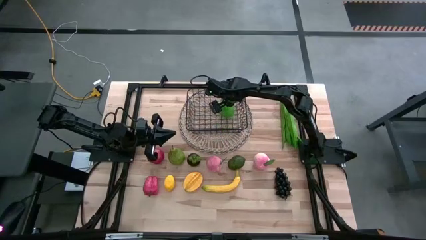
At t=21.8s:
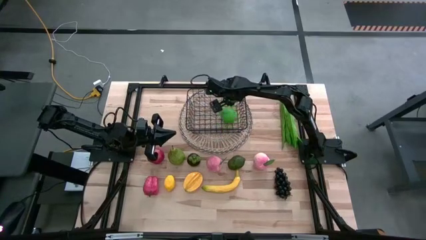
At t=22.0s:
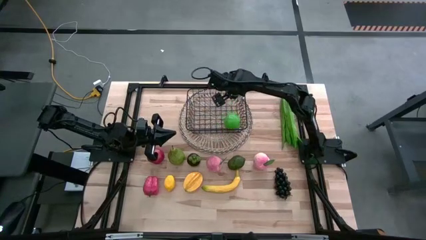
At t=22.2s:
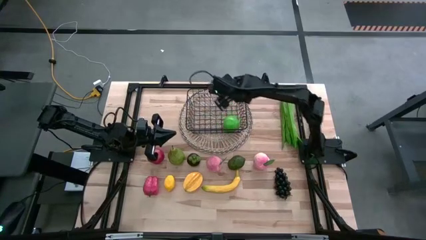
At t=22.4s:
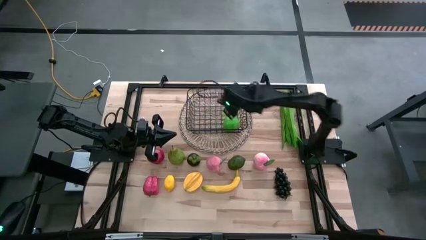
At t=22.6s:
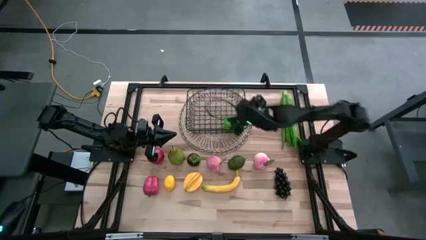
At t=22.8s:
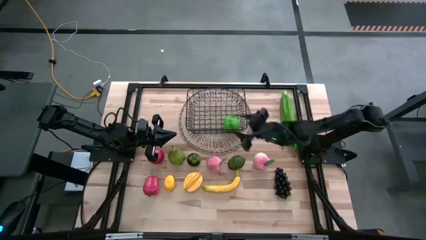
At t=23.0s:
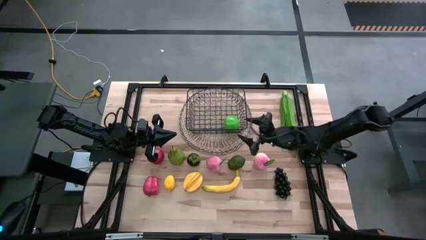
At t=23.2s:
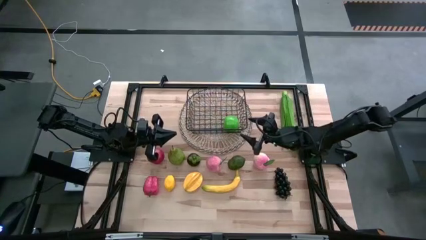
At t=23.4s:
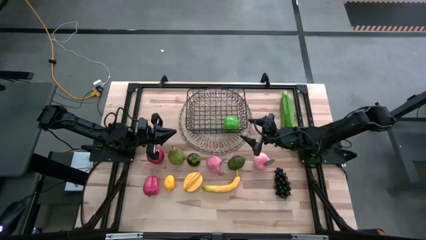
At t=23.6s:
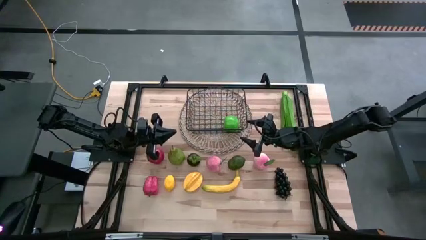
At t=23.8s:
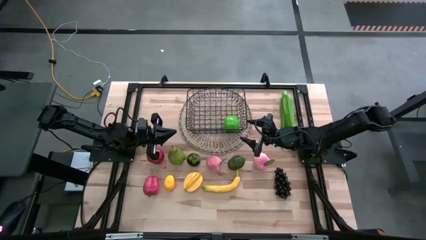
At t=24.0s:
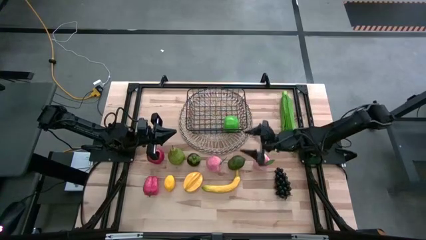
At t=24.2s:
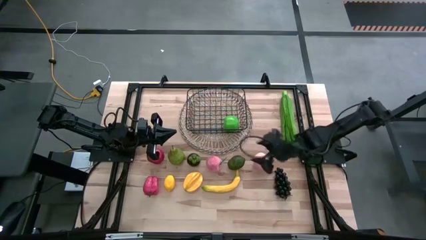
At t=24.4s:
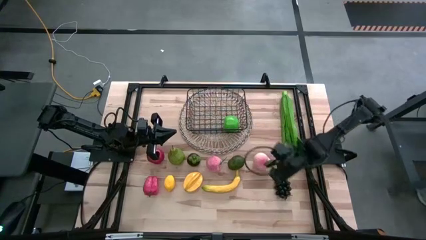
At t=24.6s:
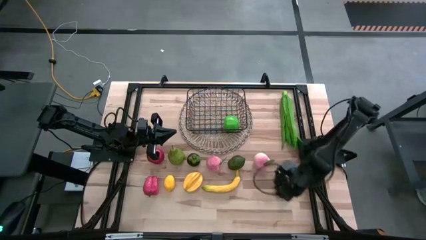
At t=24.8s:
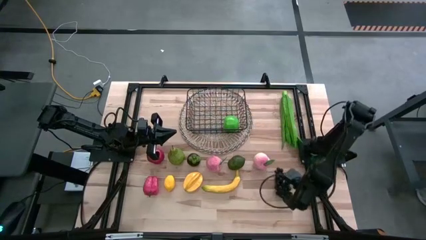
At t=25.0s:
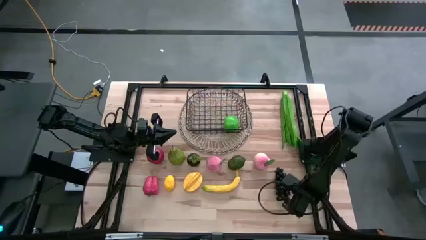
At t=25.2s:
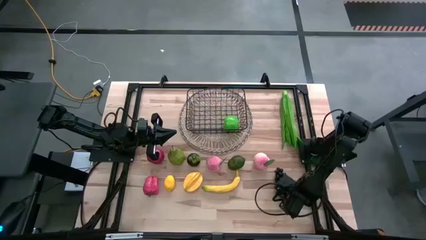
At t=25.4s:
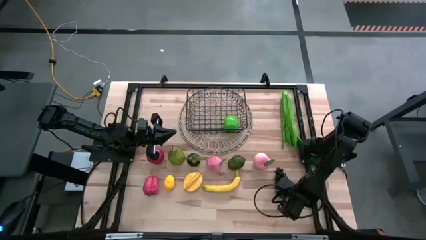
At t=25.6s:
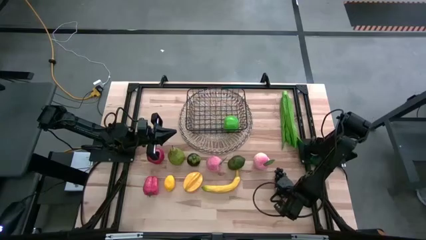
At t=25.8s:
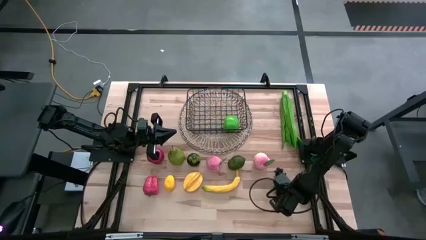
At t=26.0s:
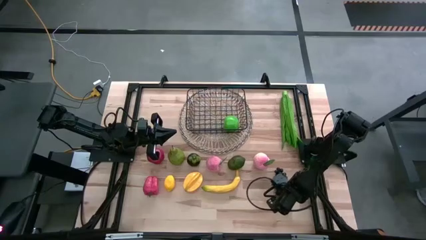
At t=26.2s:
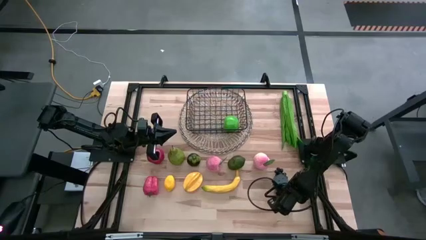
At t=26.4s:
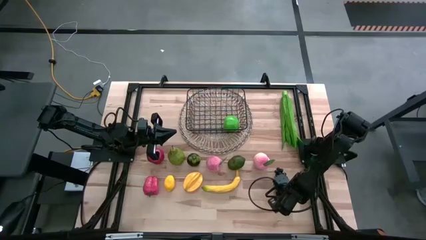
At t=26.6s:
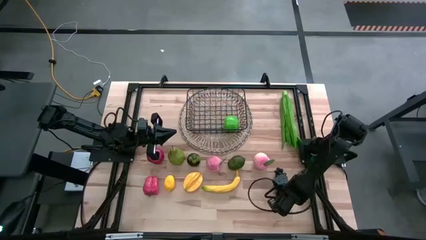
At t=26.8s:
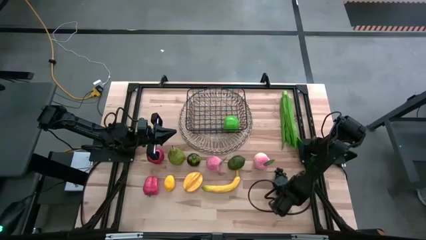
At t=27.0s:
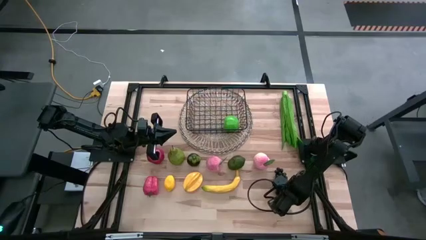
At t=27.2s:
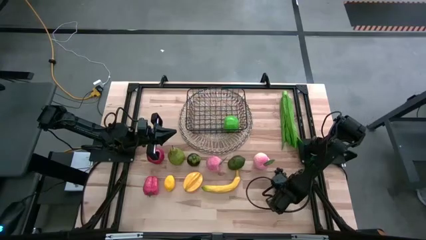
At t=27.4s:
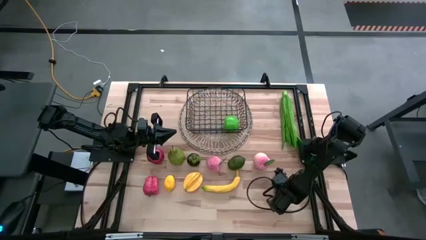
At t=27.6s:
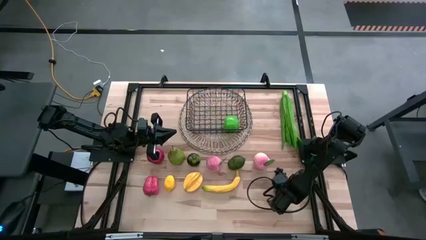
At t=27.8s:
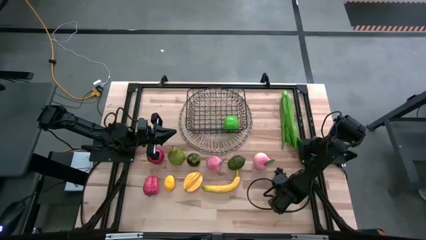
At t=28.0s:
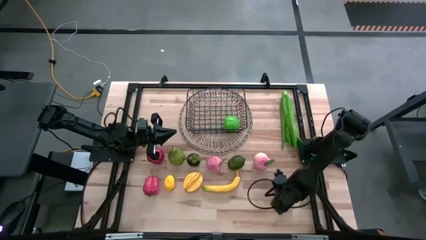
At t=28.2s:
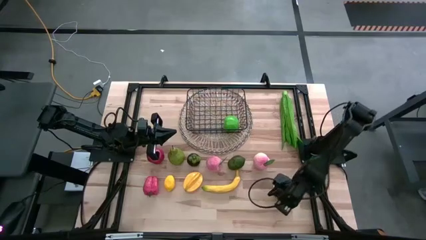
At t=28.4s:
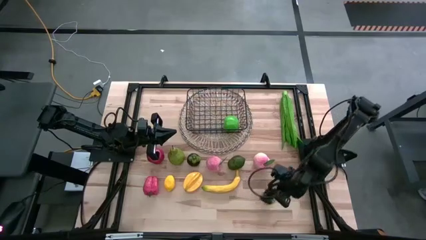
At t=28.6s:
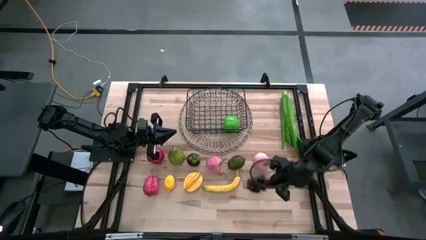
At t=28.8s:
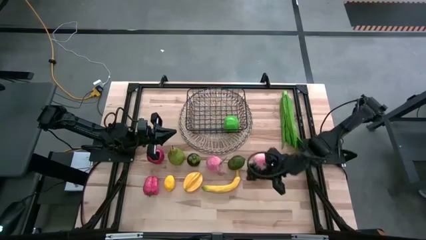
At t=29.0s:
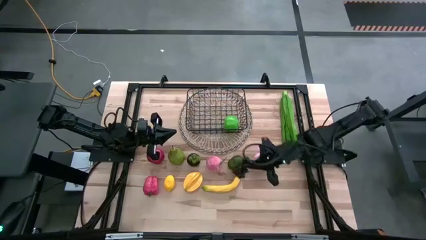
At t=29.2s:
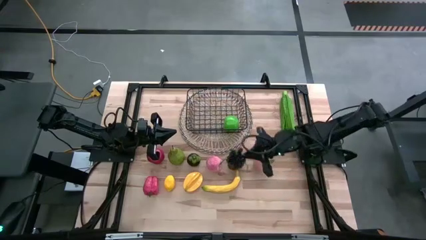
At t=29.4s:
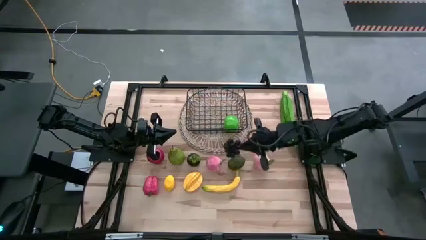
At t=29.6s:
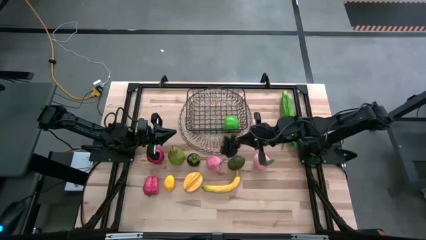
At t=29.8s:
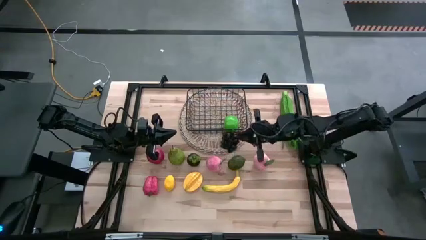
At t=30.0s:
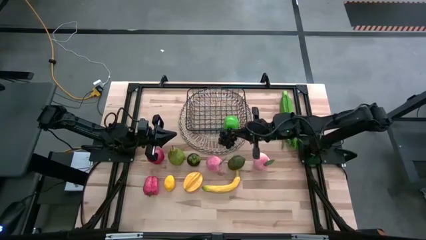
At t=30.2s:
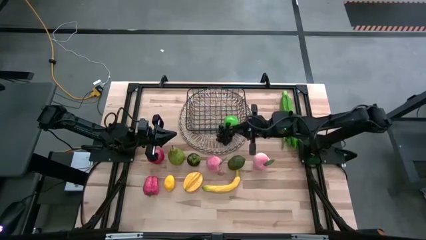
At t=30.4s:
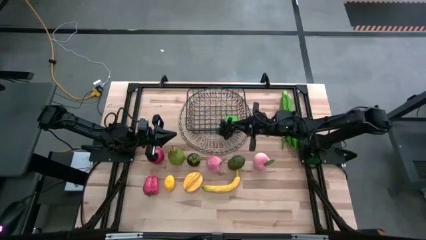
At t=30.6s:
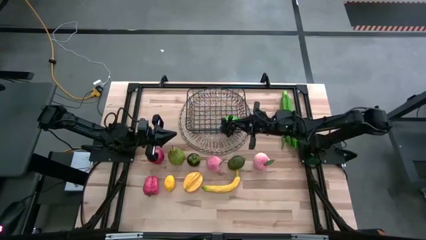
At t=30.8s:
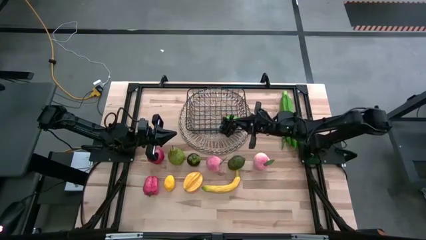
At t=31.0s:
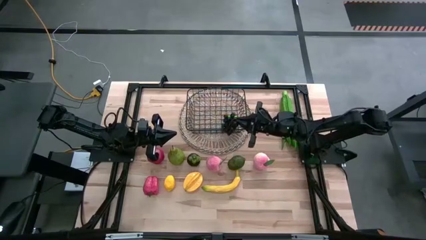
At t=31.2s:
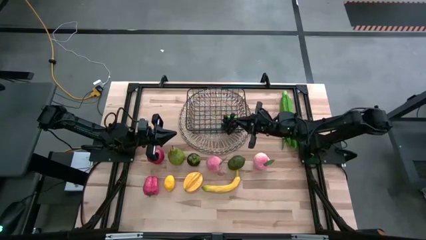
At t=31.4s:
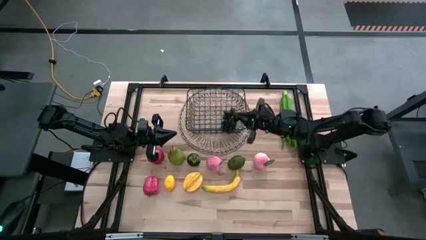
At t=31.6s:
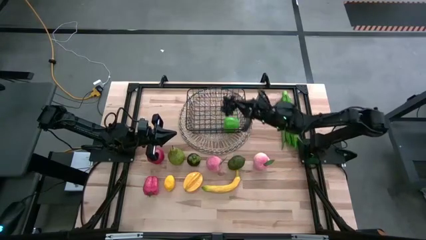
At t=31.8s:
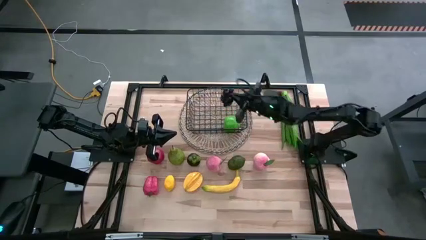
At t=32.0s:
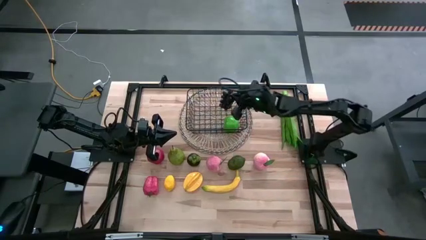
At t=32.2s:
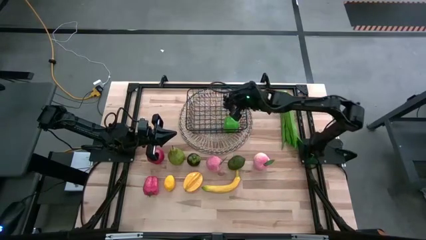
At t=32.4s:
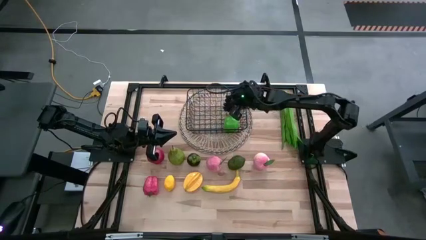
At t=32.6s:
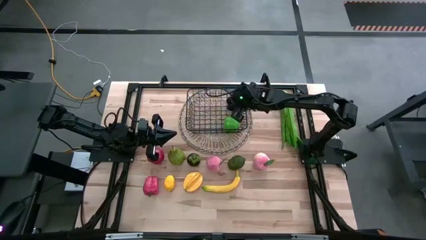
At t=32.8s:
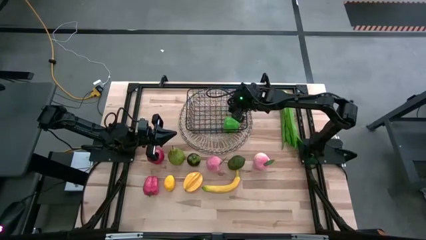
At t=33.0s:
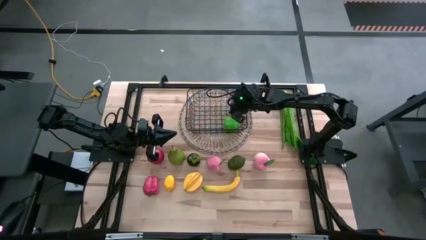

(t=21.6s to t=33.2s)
Task: Build produce basket
Put the grapes into the black wire basket
